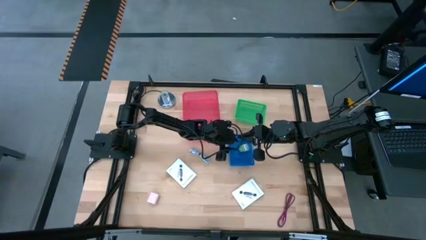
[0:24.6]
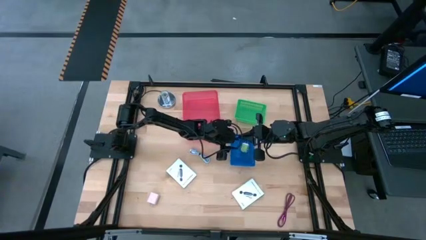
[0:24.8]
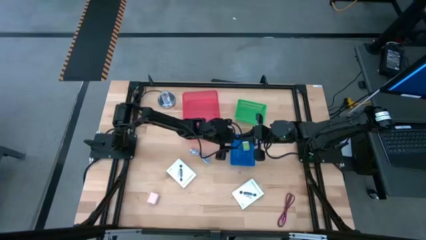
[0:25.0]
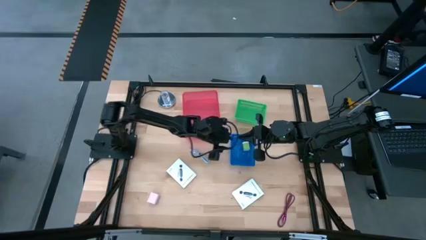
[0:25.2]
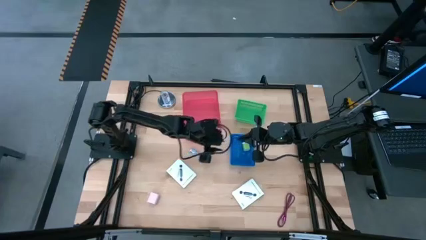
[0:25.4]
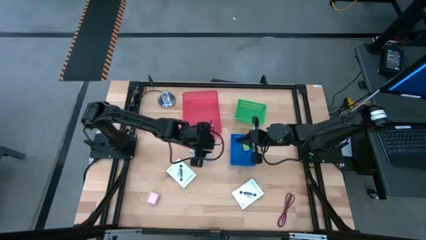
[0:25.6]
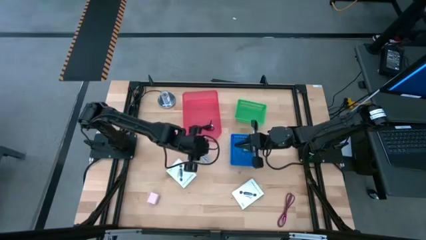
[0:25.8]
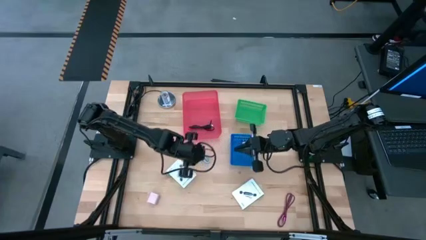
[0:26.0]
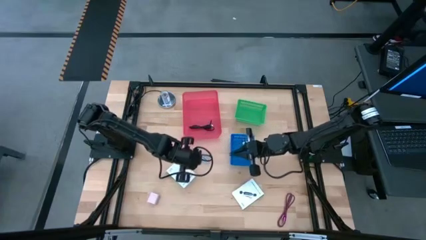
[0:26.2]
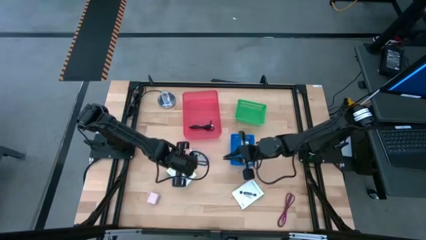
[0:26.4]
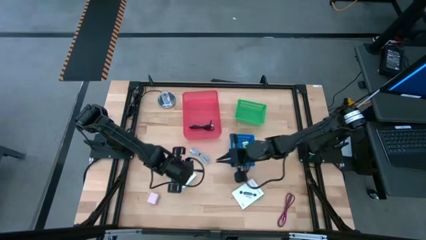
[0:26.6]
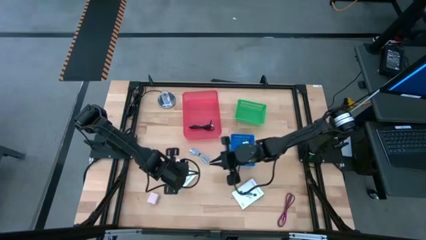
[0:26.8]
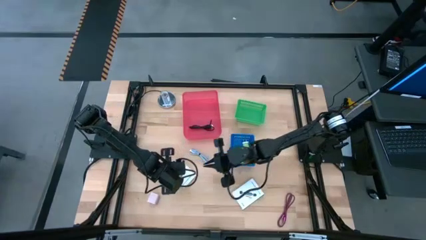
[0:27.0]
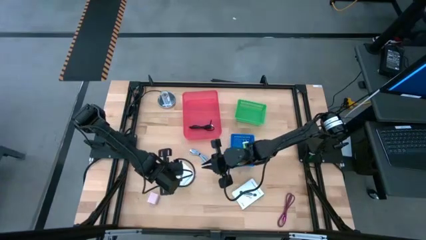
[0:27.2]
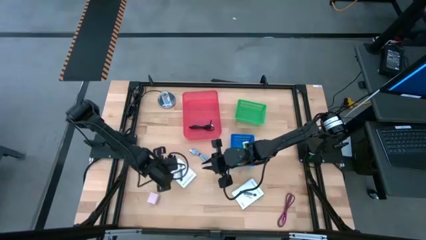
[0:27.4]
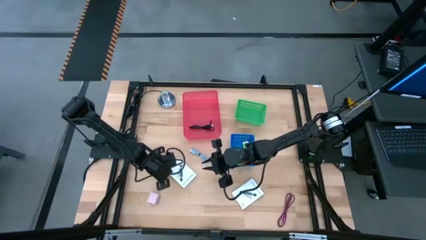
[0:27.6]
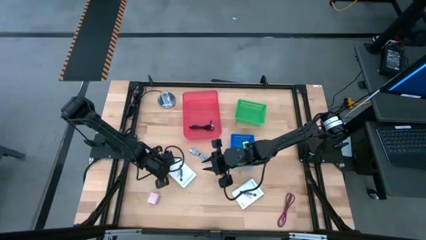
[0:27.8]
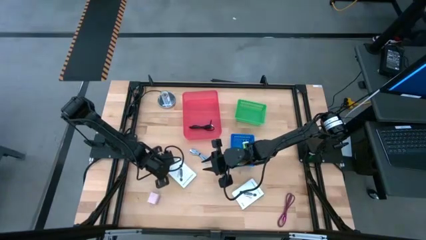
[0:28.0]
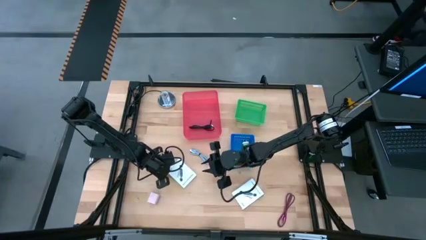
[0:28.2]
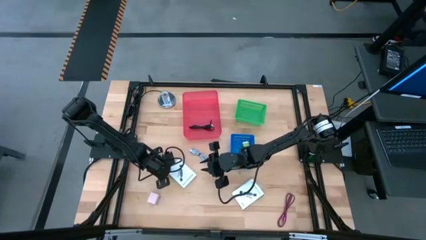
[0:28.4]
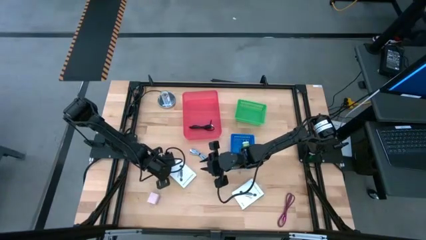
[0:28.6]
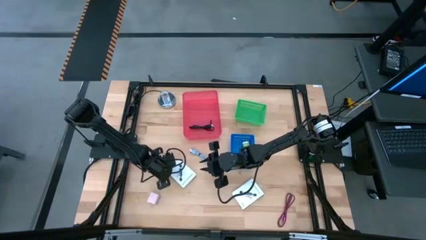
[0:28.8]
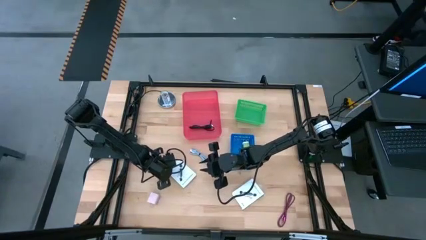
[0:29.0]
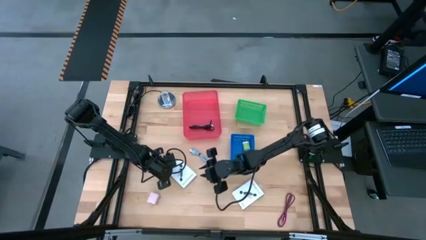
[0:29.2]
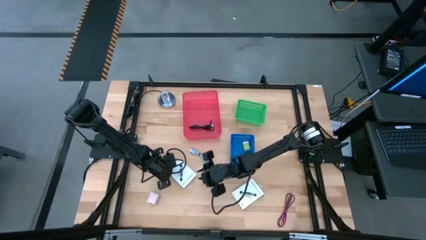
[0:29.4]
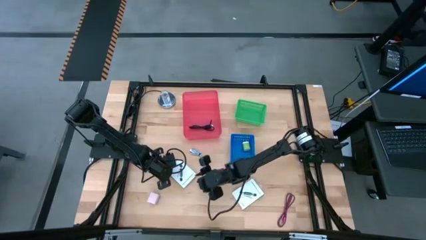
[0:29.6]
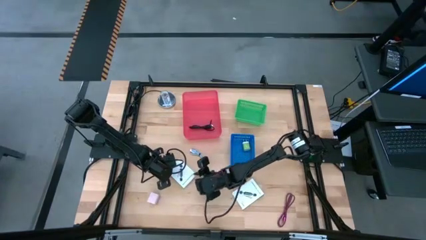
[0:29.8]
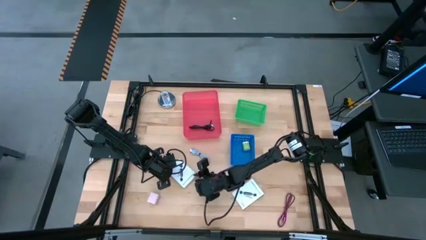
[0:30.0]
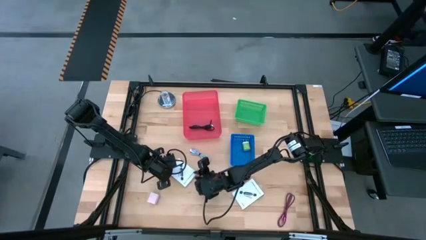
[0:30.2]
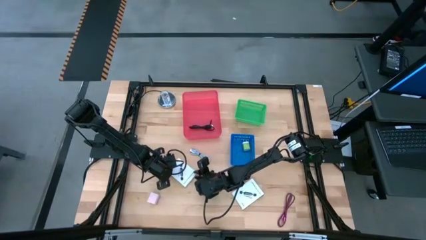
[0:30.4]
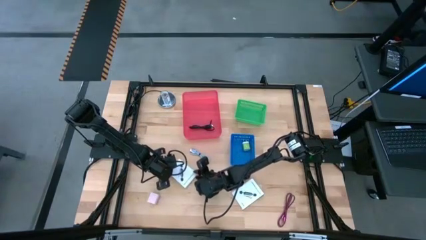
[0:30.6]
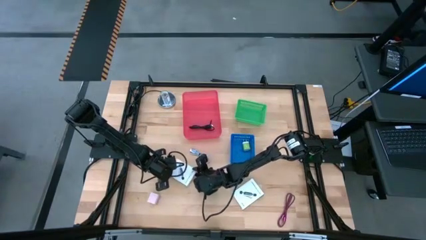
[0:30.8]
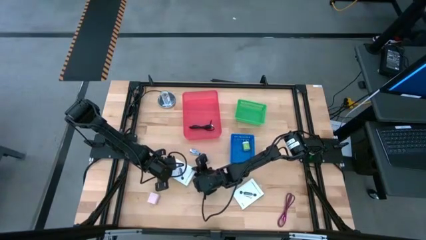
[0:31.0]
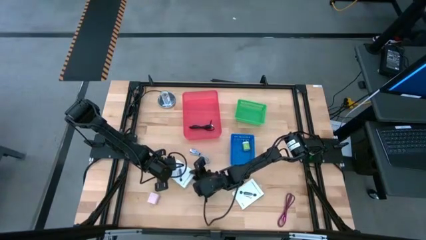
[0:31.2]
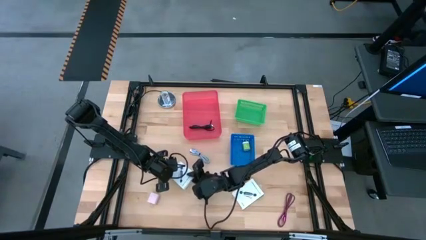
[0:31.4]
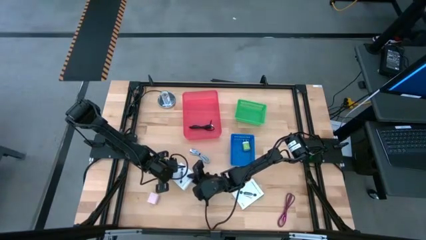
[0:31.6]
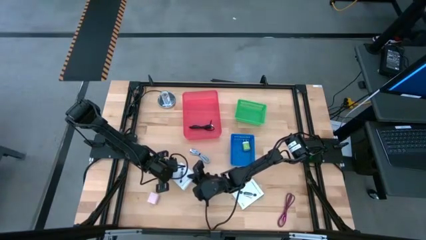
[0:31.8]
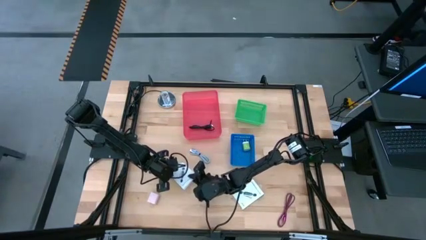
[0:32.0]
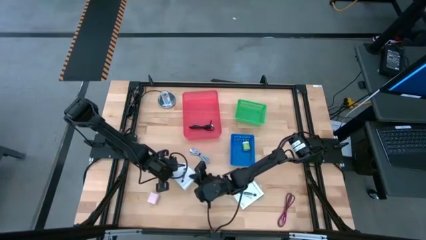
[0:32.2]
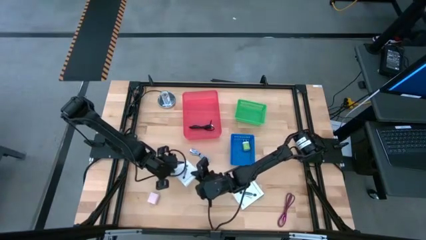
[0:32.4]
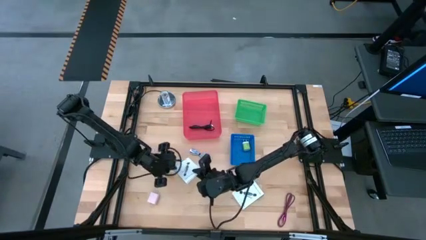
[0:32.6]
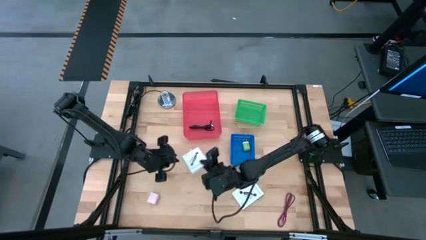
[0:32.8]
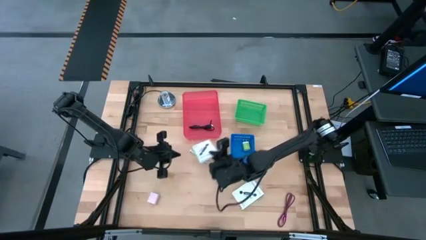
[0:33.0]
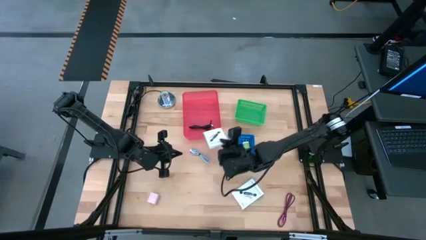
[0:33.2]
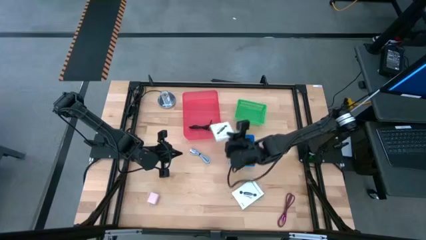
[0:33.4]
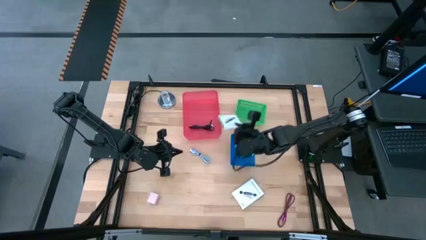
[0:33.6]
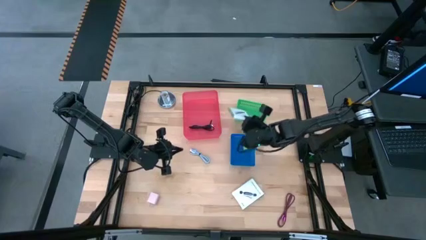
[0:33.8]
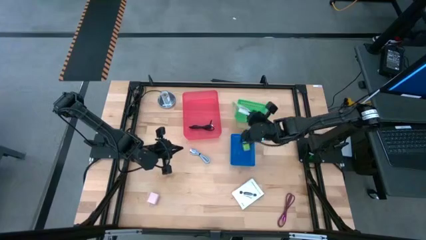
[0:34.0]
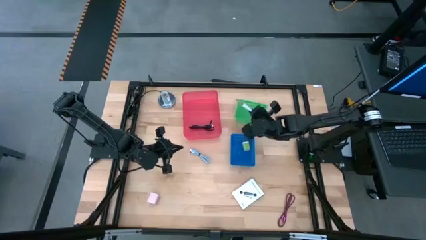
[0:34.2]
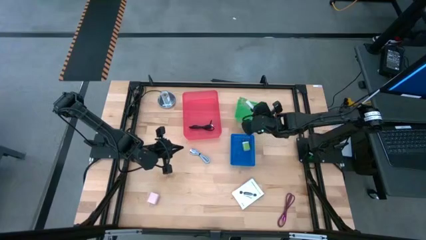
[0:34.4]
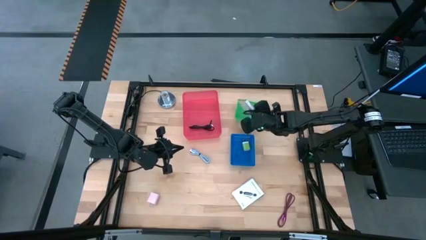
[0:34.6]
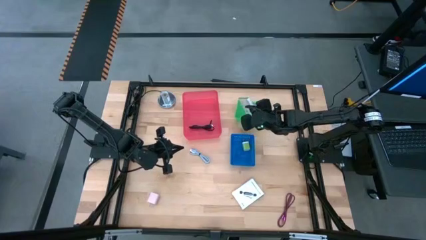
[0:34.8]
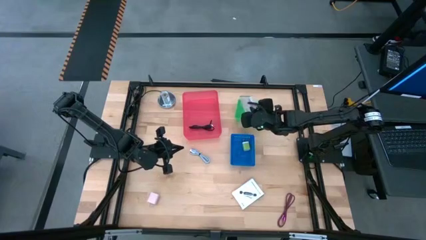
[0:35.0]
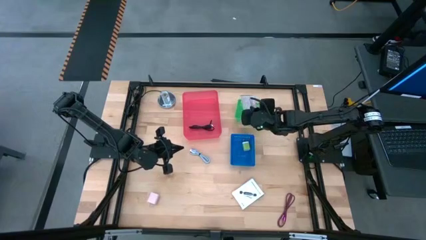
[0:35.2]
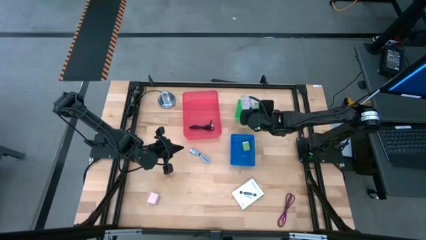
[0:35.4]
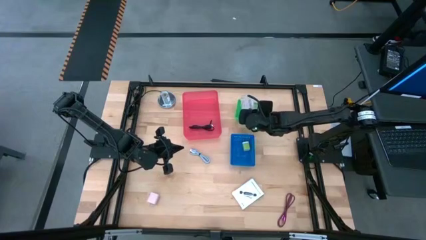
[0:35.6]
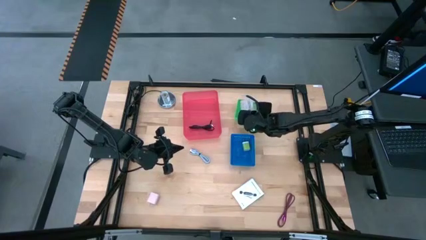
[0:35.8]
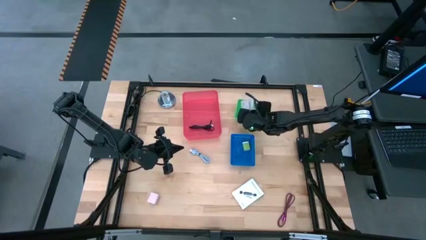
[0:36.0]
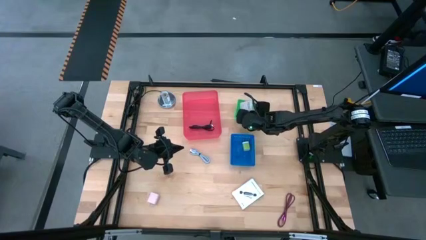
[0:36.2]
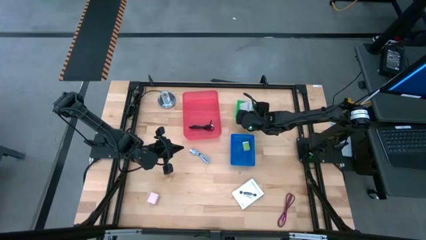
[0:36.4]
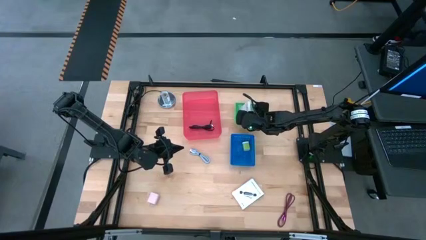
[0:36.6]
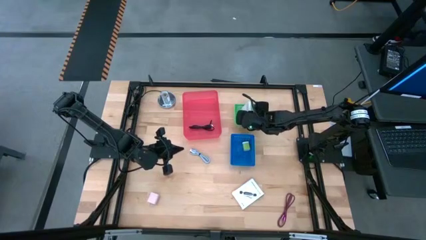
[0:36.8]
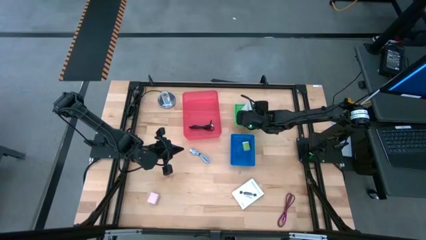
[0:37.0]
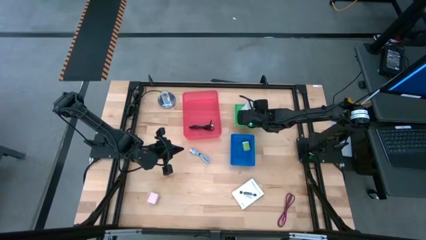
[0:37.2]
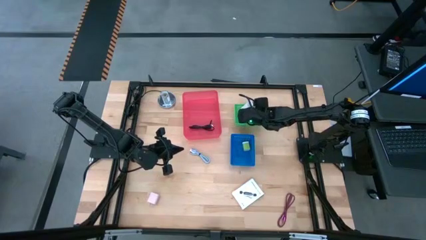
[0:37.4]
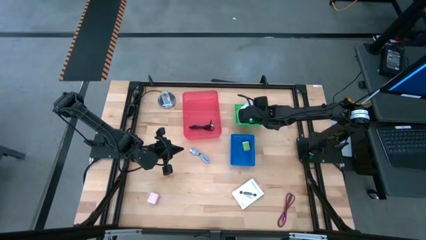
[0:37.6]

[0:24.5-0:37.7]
Task: Pick and place items into bin
Put the left card reader box into the green bin

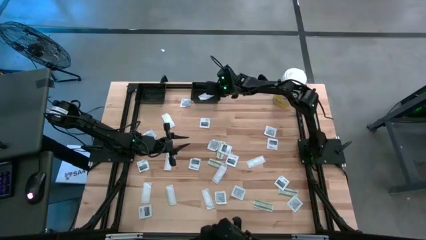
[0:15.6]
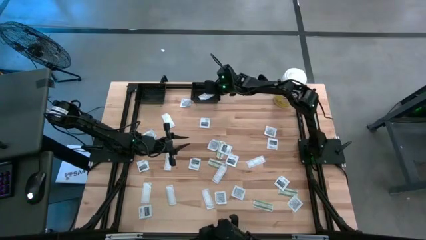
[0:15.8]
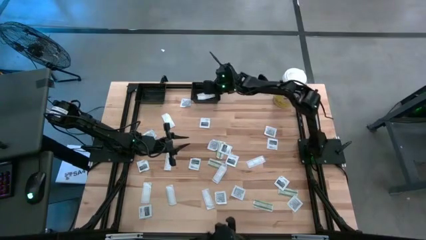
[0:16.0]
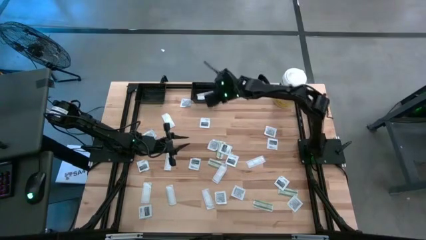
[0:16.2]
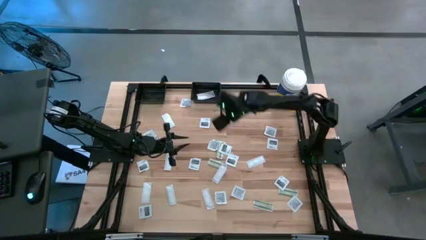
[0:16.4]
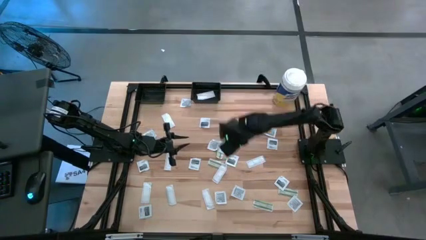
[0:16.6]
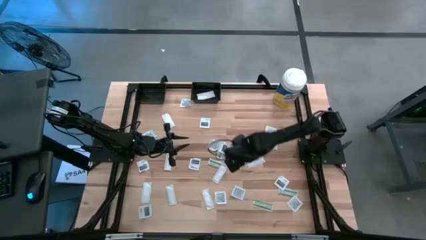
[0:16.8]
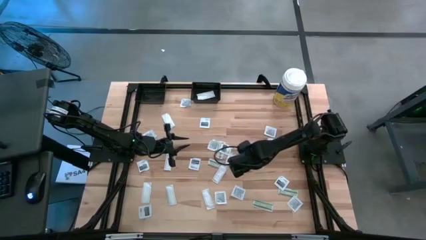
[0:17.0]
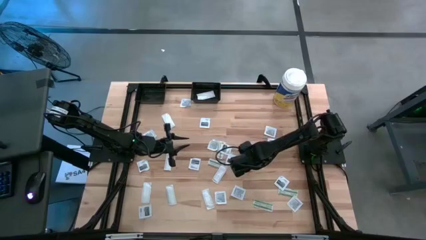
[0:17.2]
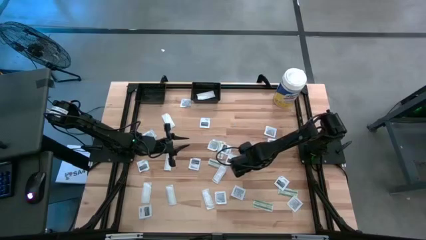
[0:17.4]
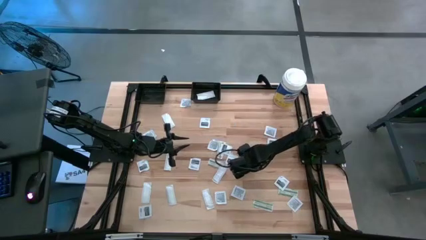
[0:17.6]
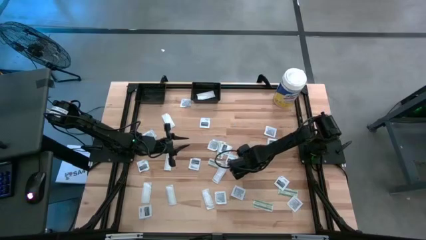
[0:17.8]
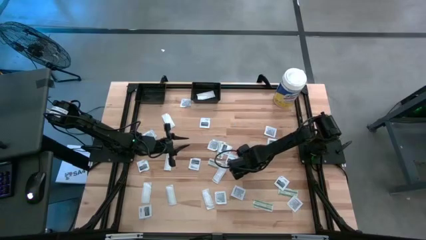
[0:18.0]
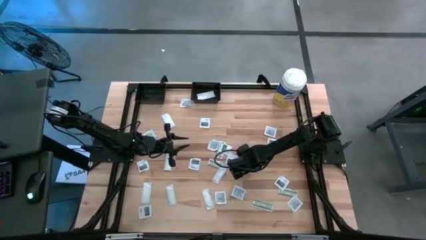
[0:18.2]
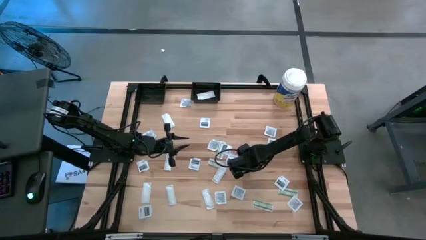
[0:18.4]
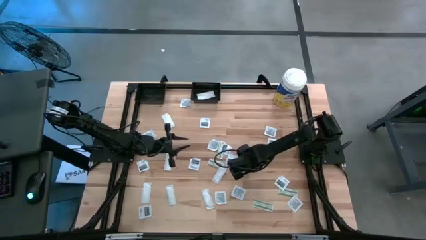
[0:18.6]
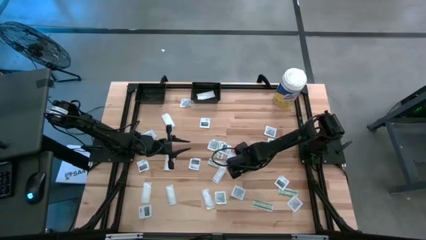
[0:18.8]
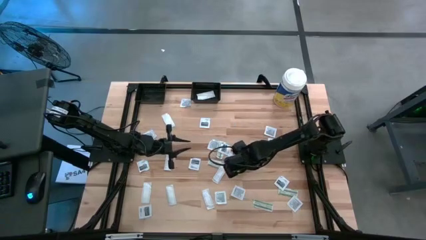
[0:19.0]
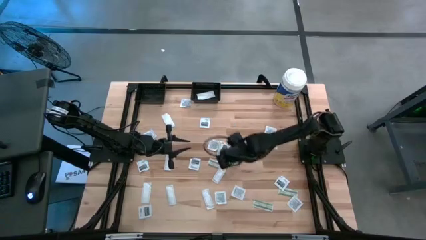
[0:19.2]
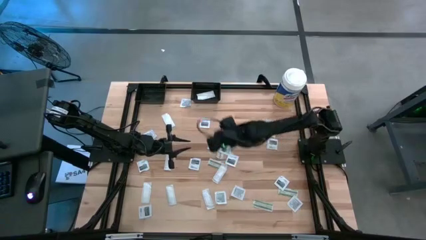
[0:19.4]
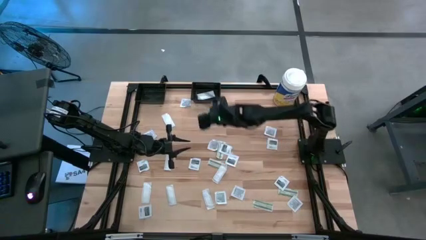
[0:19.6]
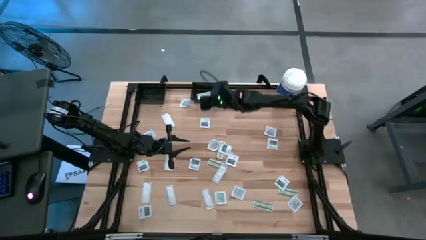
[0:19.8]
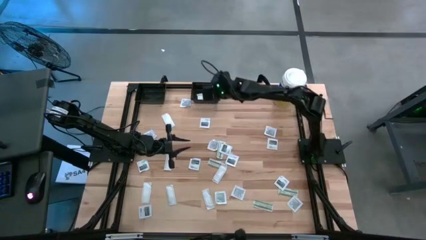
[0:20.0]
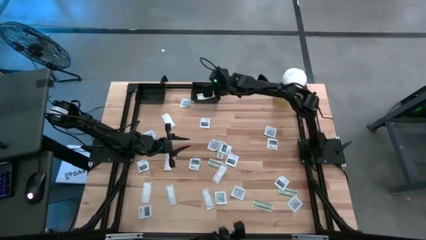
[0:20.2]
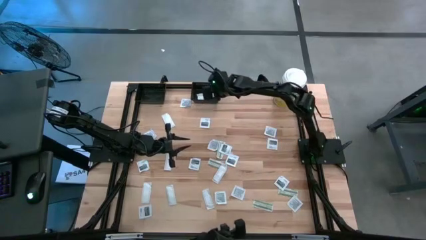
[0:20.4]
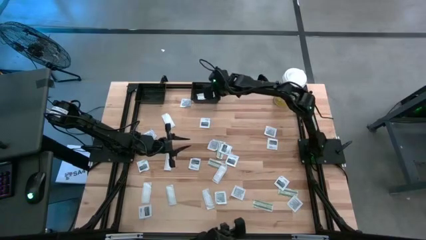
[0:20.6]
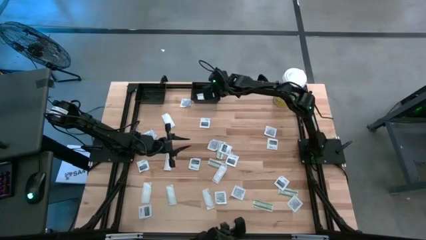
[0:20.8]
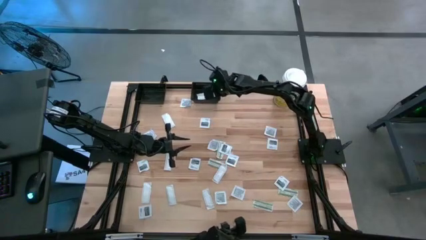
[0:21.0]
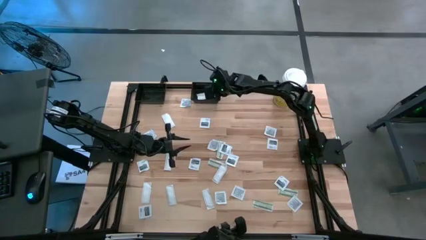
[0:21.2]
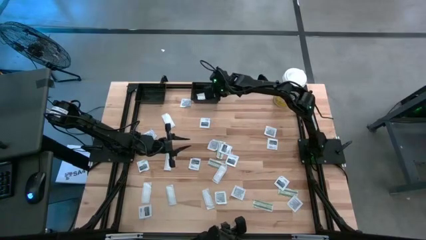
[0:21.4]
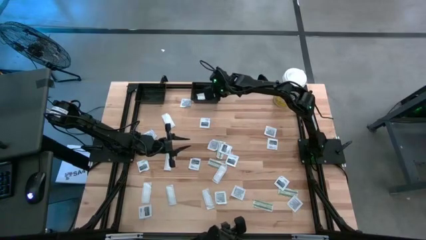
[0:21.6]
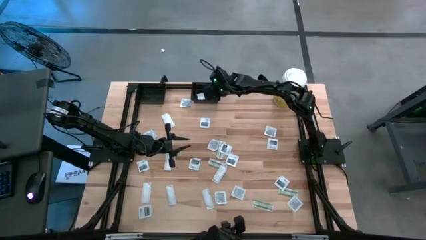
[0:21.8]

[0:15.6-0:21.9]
Task: Pick & Place First Aid Supplies
Put the green bandage pack into the right black bin
